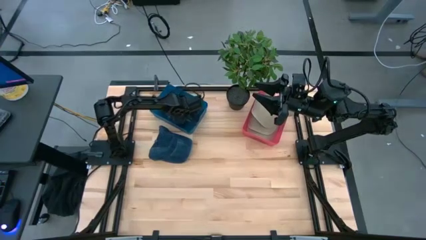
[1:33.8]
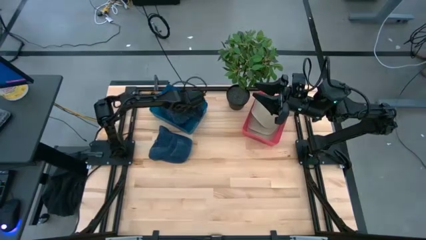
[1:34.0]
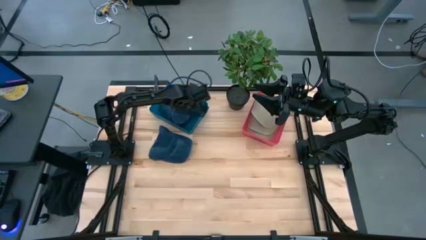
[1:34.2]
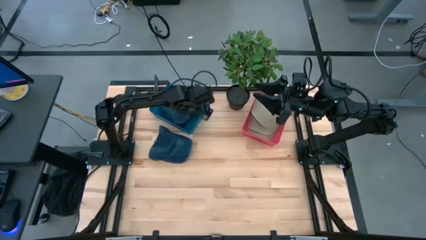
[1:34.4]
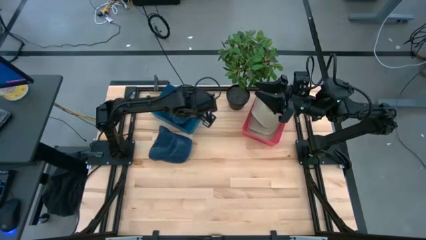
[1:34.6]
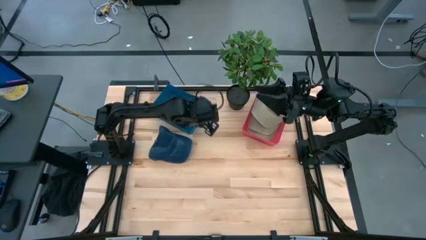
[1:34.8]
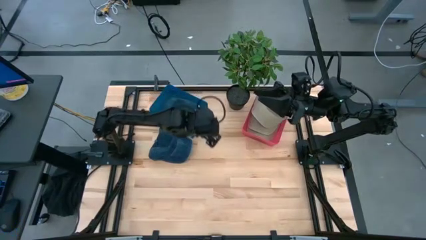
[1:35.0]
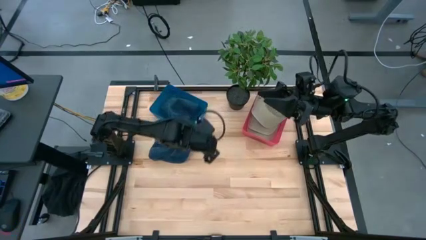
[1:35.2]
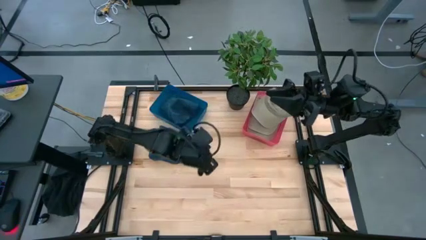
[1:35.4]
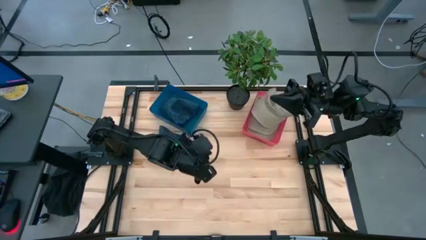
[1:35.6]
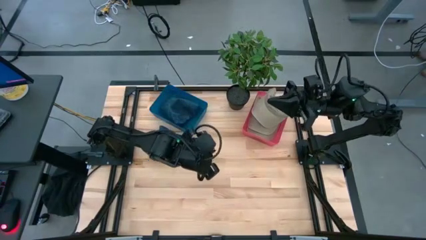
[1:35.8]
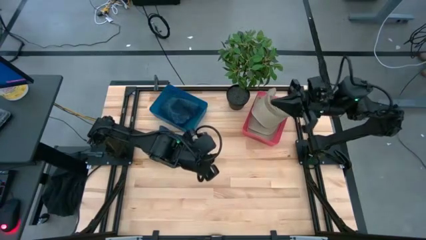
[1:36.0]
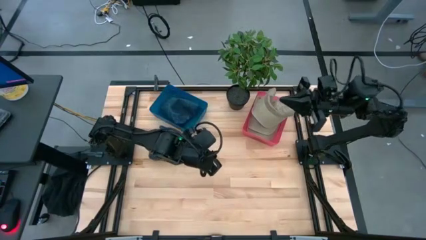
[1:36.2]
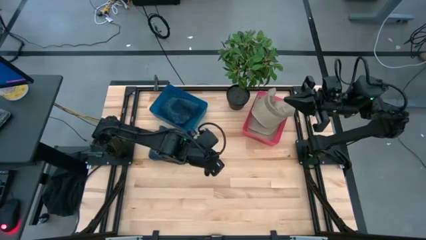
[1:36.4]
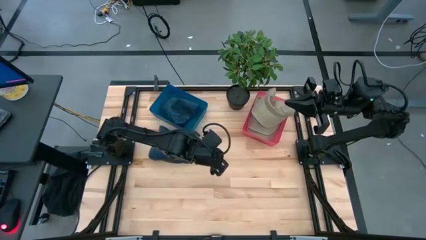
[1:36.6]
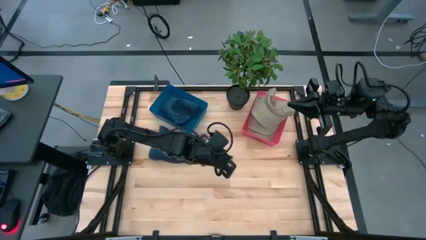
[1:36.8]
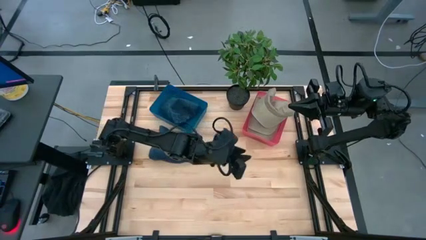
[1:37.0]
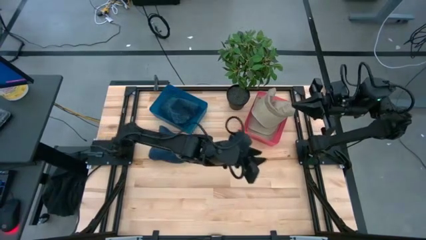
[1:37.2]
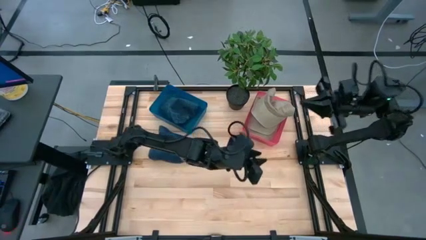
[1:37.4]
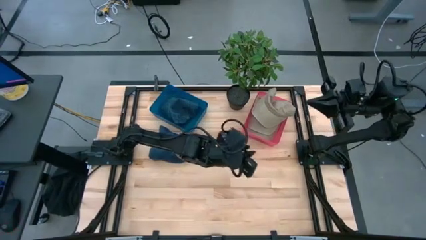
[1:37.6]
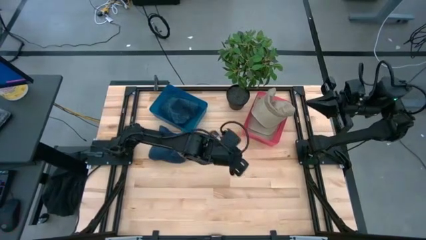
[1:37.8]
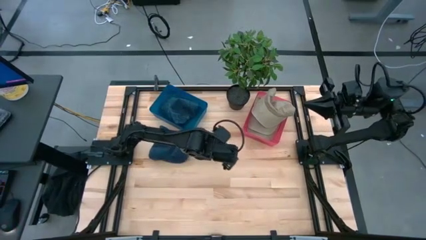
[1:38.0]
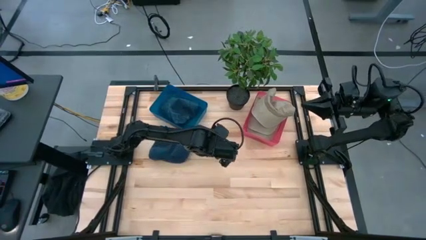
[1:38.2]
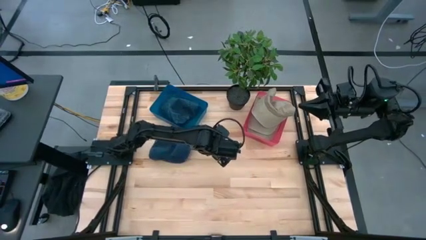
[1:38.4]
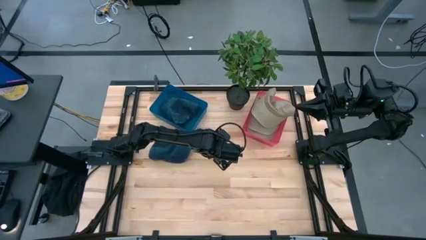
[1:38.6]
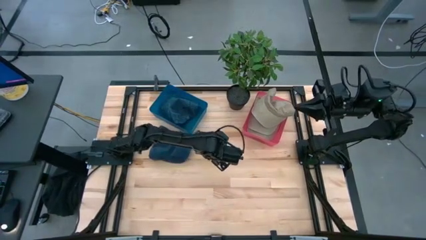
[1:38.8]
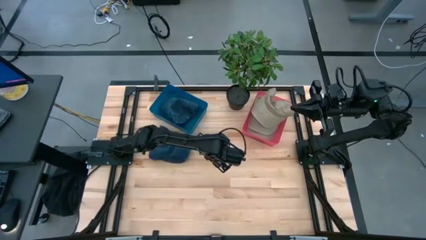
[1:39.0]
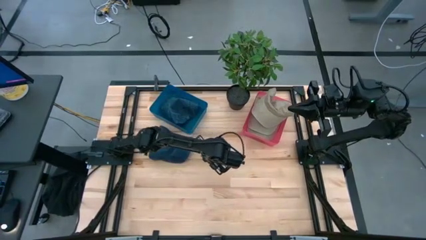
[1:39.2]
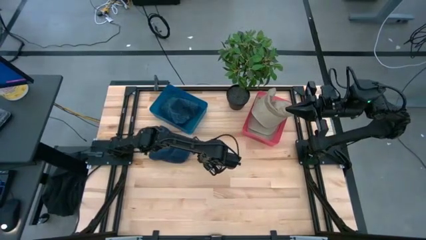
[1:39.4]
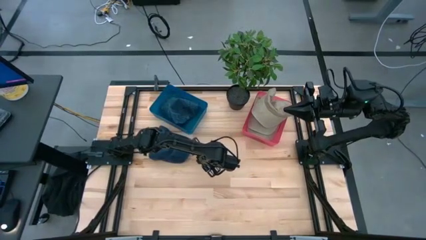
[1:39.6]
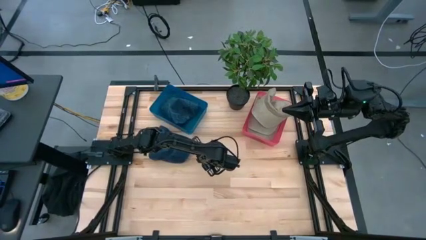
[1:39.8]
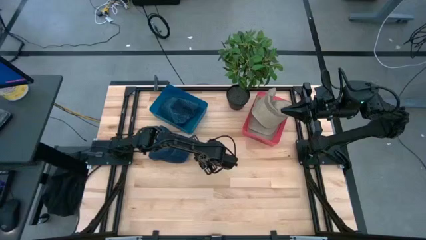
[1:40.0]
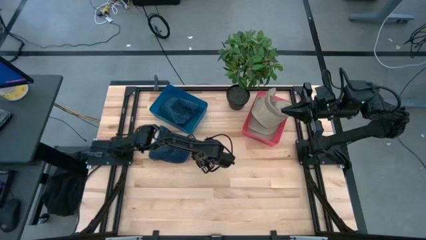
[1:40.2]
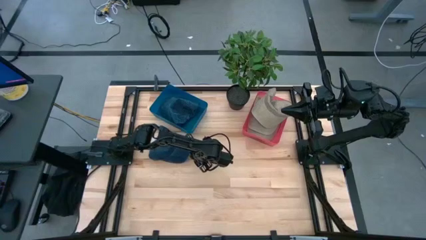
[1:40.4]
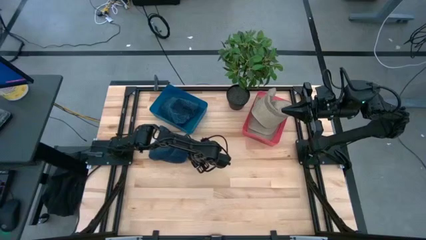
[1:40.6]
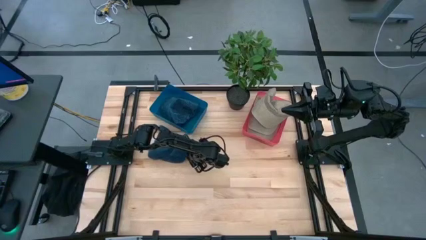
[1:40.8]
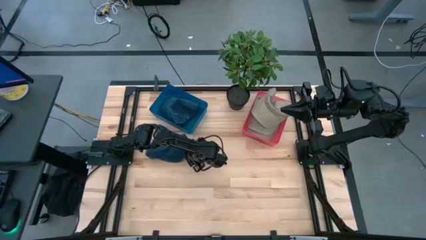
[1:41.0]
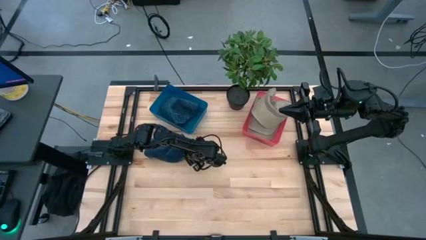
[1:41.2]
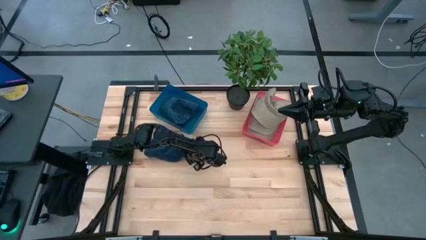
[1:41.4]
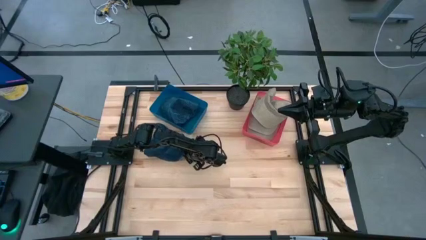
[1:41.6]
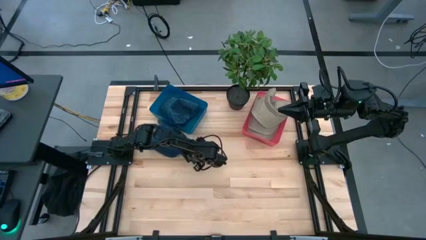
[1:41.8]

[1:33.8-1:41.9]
Task: Pick & Place hat
Put the blue cap into the blue bin

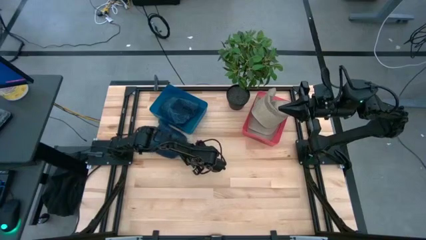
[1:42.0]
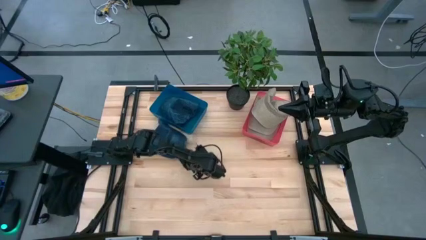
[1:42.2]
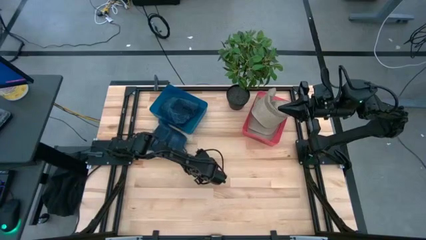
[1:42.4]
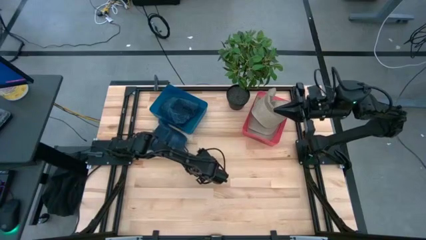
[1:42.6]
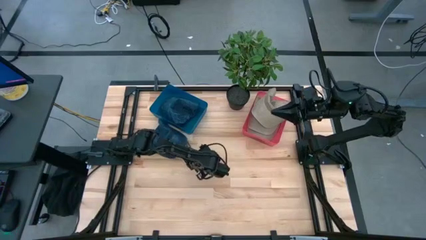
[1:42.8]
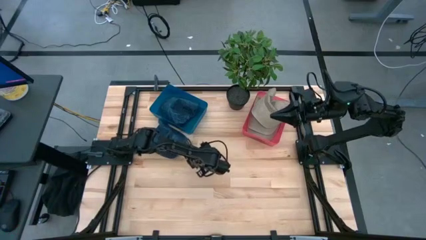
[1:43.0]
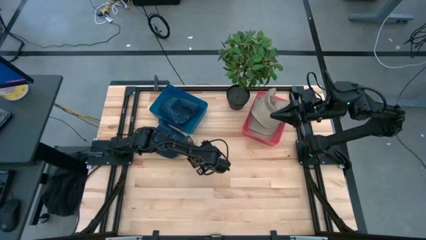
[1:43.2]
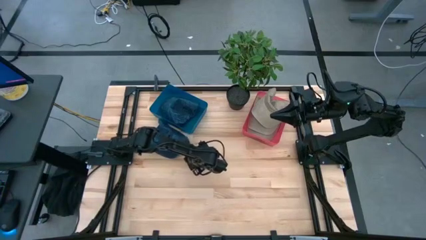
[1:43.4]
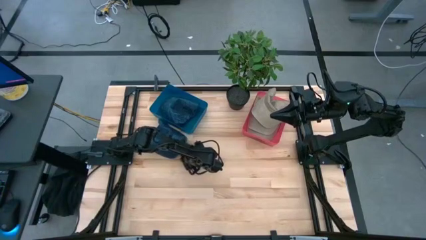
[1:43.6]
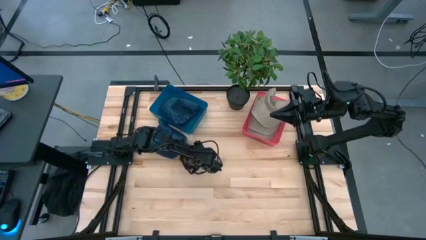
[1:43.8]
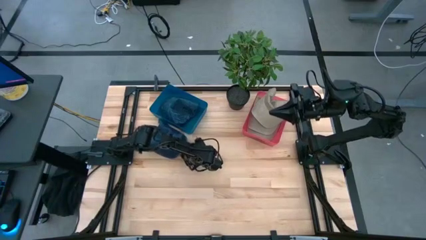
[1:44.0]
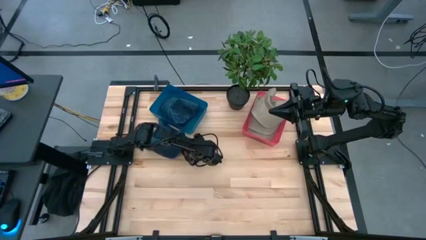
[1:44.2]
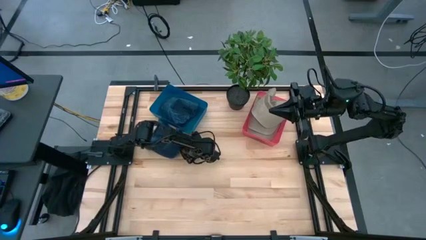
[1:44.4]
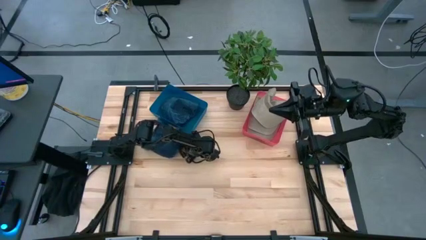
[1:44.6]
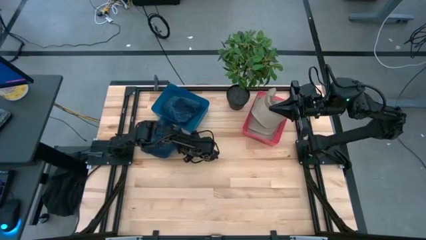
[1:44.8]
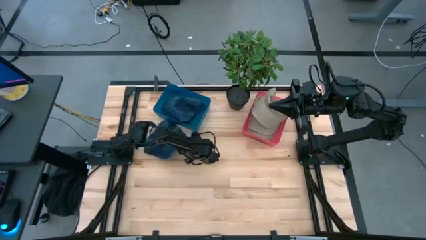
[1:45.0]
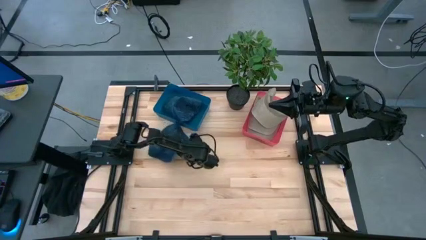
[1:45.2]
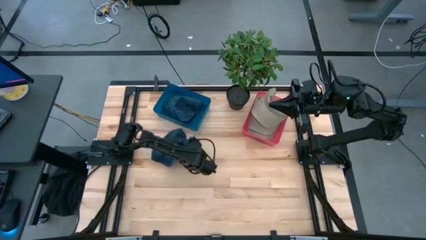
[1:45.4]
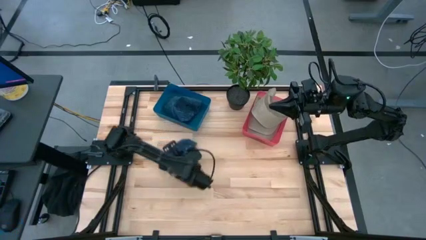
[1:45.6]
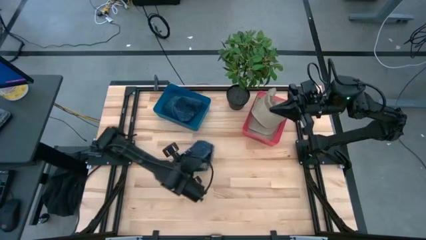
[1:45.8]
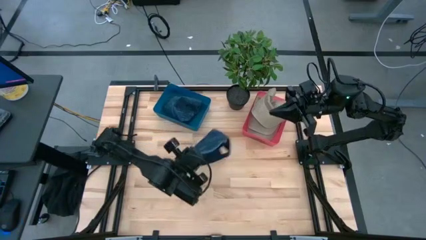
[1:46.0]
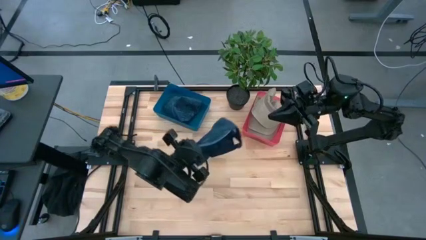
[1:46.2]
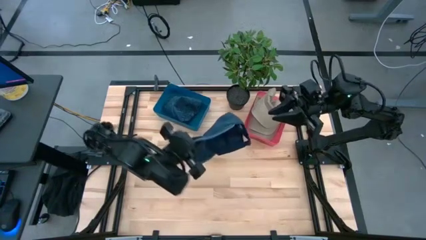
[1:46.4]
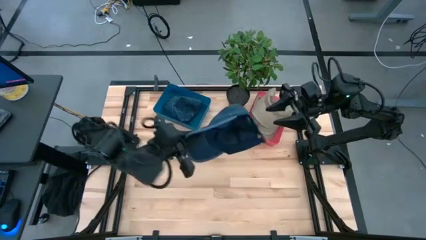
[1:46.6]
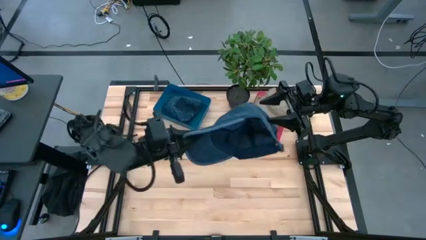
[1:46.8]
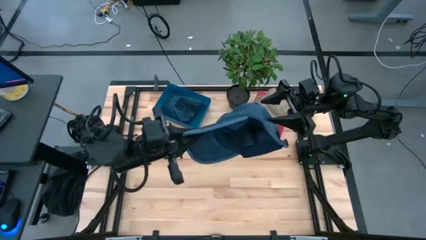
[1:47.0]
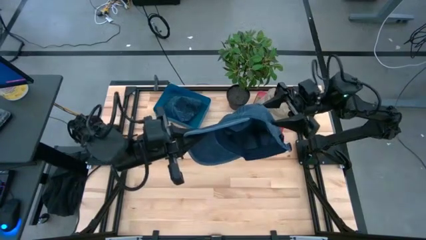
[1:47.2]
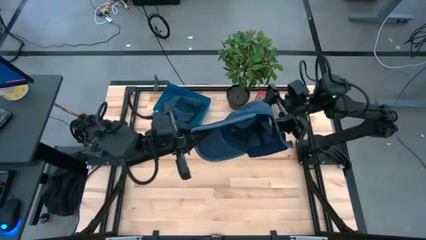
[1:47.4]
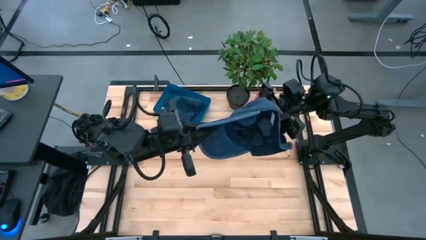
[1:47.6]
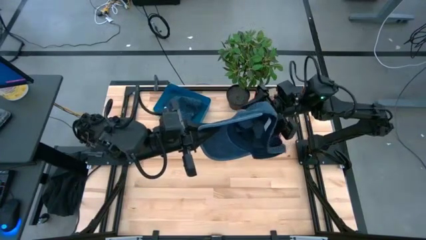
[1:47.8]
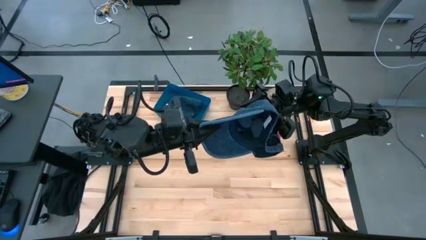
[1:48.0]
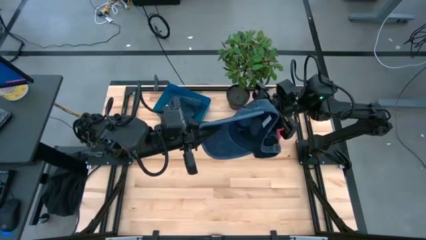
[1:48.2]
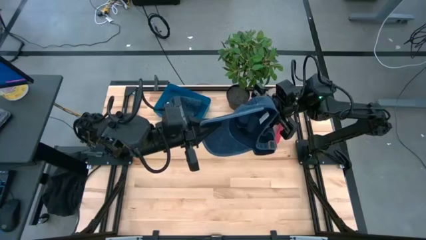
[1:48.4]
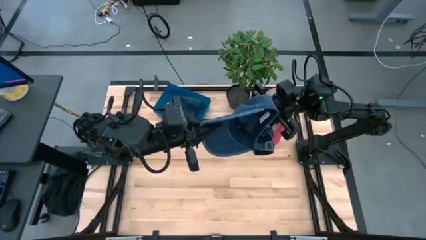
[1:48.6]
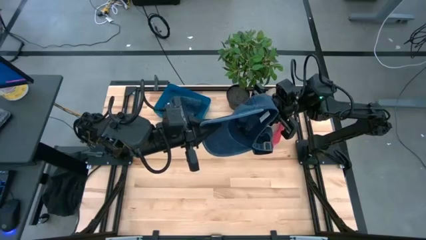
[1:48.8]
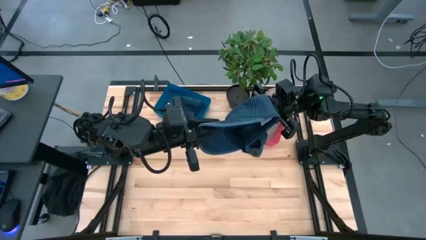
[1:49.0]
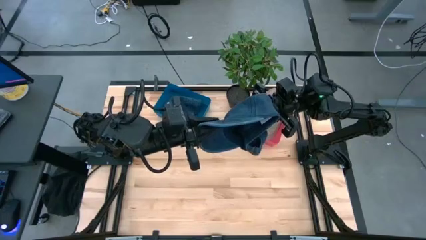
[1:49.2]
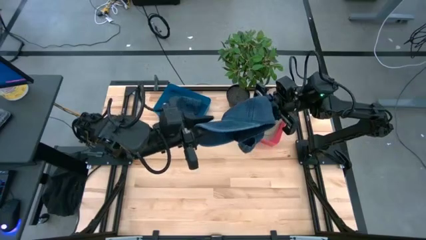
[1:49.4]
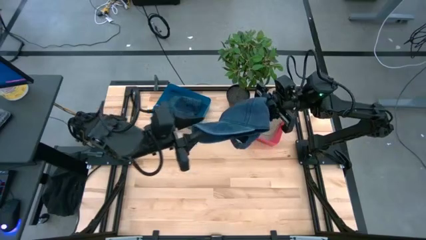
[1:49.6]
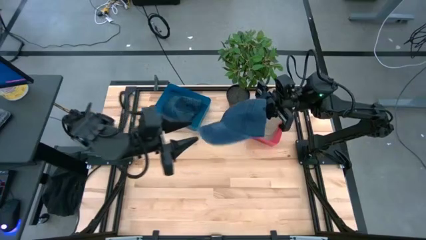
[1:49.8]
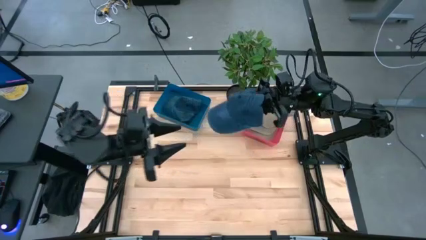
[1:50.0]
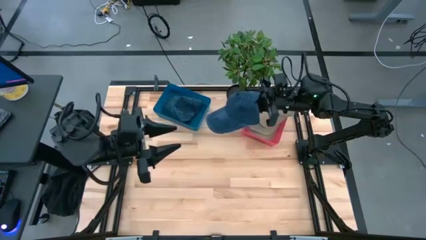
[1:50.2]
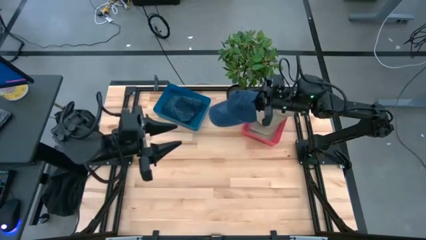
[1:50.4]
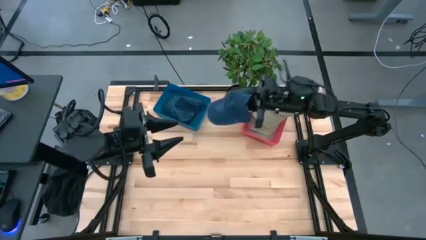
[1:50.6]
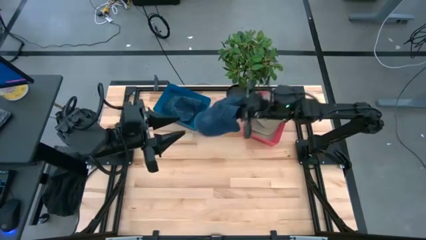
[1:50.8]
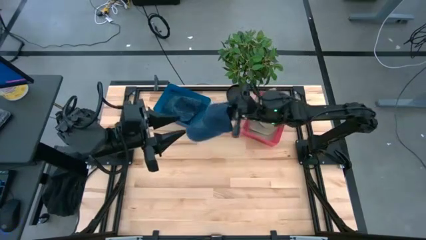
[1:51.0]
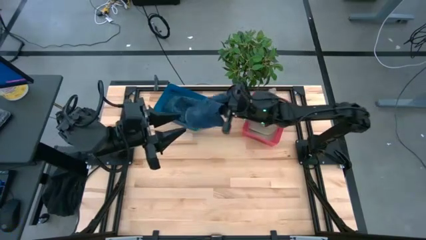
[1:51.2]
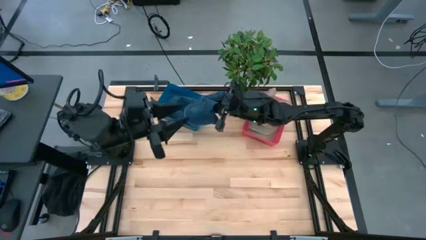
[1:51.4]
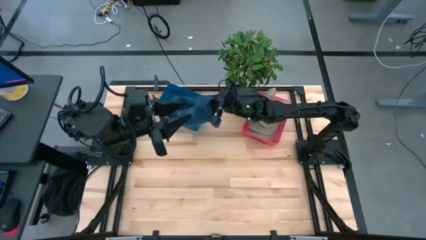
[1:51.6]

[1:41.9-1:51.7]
Put the blue cap into the blue bin
